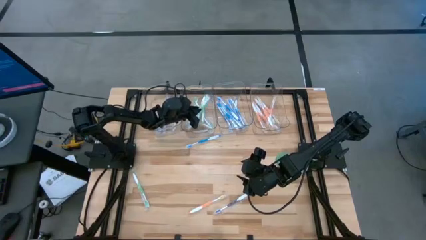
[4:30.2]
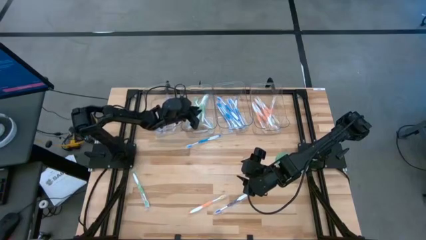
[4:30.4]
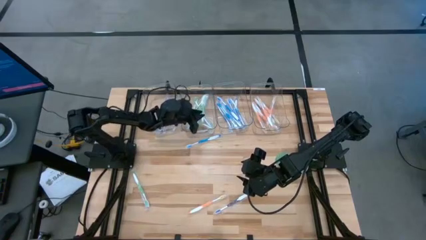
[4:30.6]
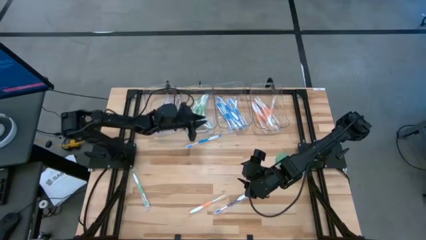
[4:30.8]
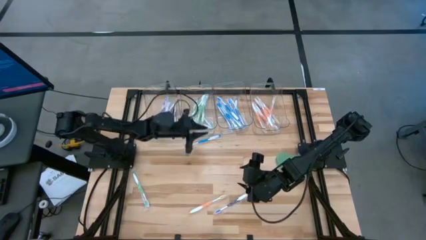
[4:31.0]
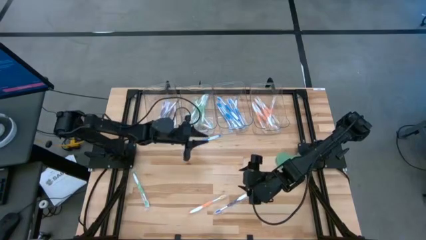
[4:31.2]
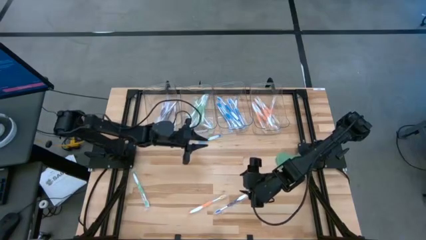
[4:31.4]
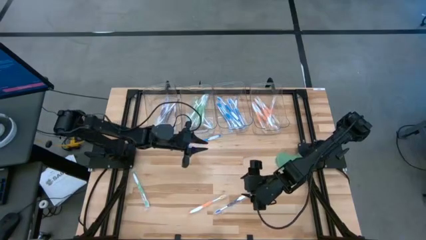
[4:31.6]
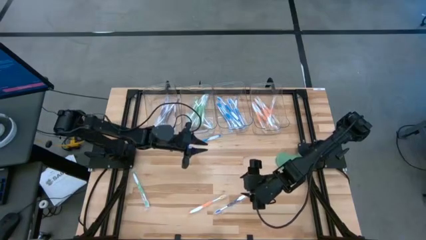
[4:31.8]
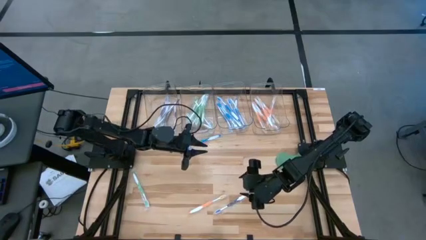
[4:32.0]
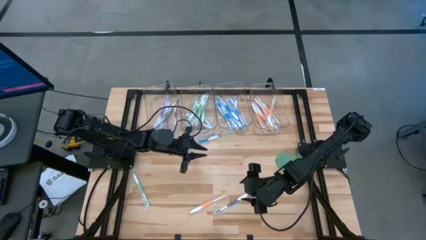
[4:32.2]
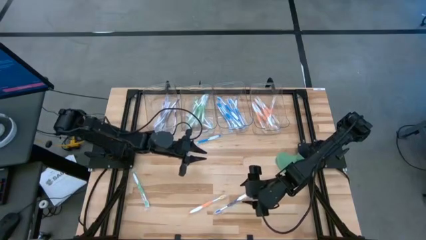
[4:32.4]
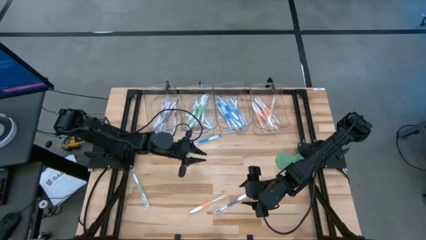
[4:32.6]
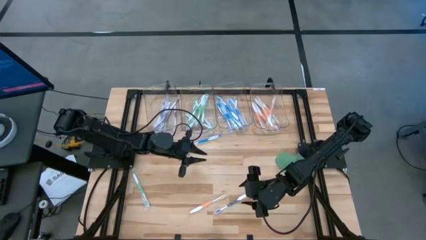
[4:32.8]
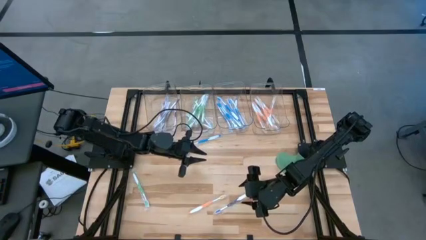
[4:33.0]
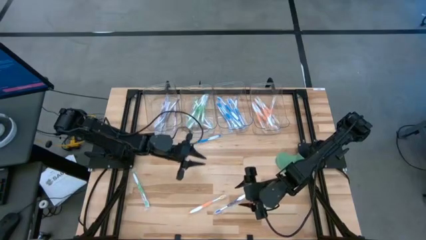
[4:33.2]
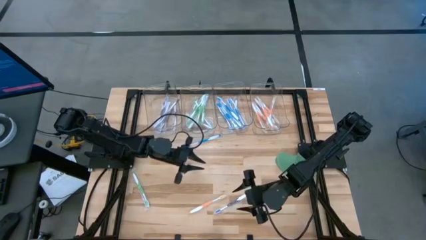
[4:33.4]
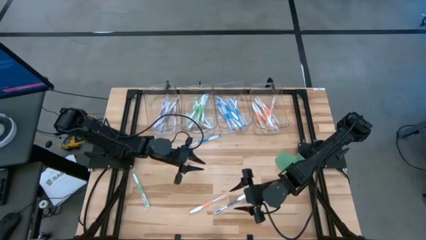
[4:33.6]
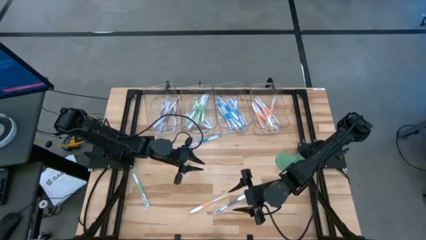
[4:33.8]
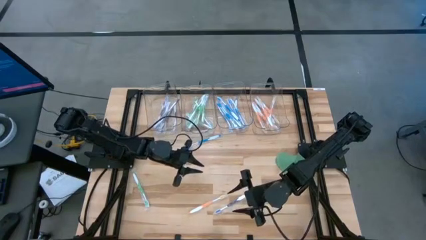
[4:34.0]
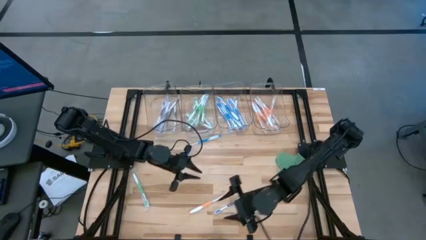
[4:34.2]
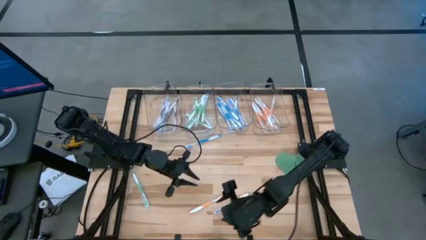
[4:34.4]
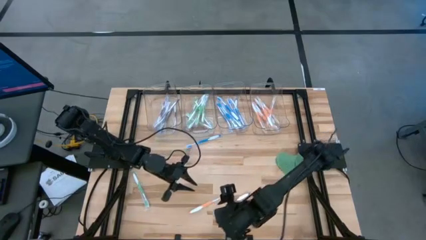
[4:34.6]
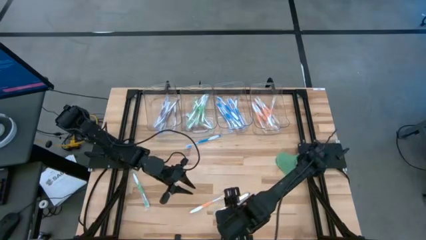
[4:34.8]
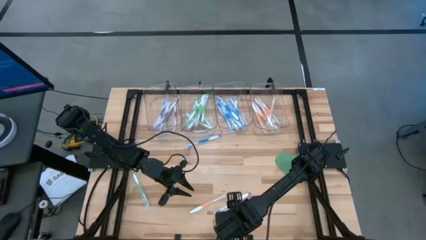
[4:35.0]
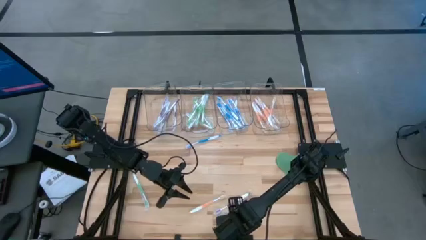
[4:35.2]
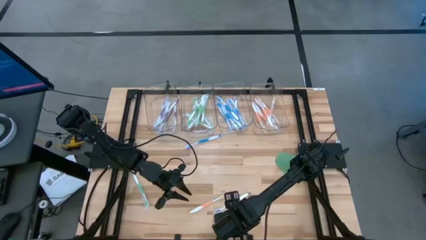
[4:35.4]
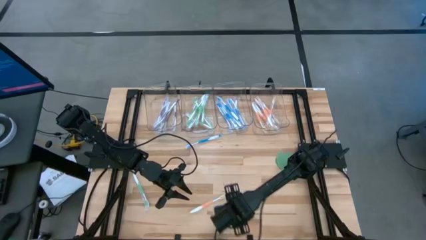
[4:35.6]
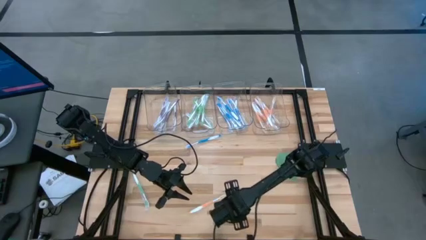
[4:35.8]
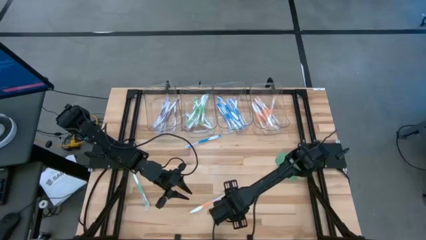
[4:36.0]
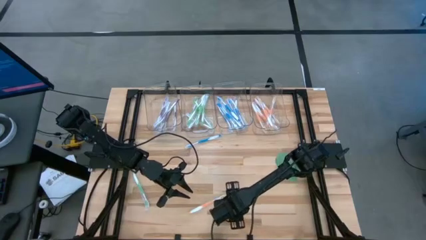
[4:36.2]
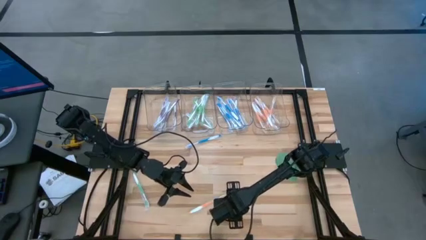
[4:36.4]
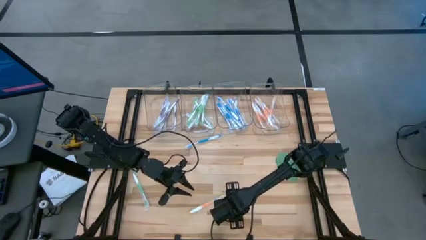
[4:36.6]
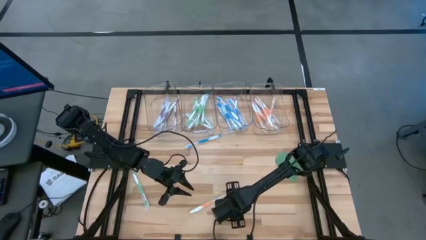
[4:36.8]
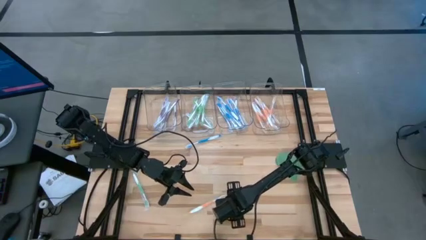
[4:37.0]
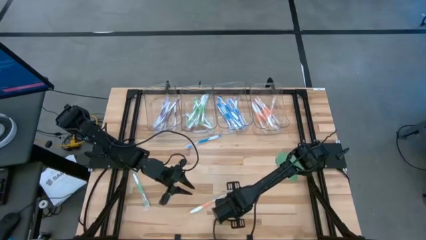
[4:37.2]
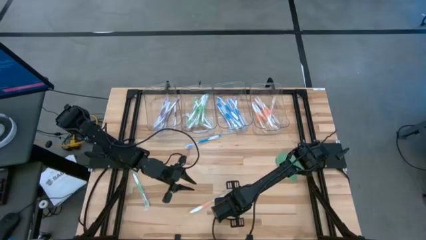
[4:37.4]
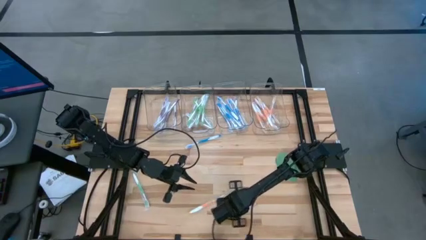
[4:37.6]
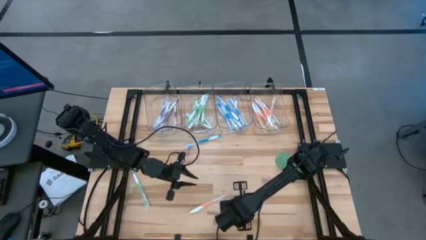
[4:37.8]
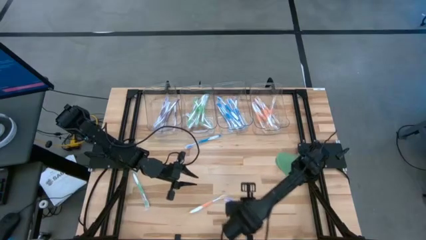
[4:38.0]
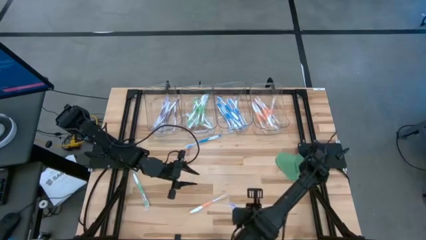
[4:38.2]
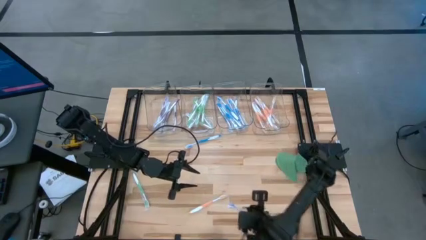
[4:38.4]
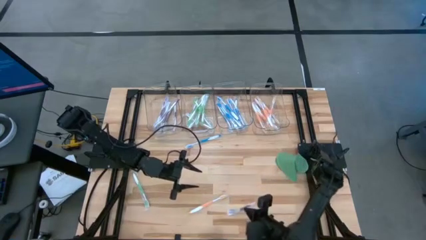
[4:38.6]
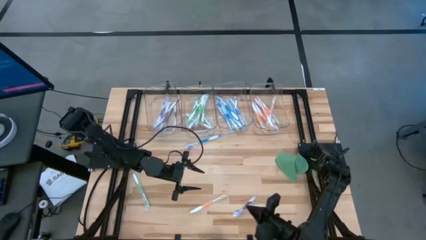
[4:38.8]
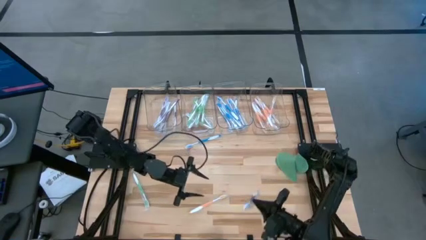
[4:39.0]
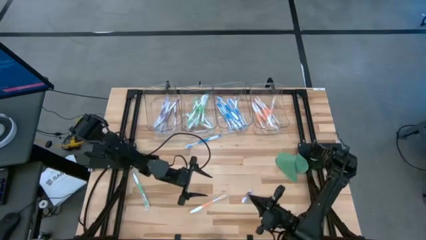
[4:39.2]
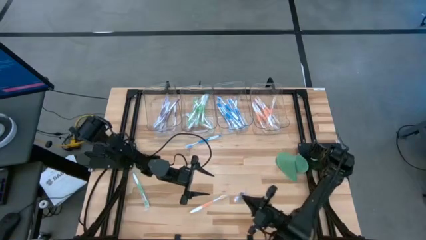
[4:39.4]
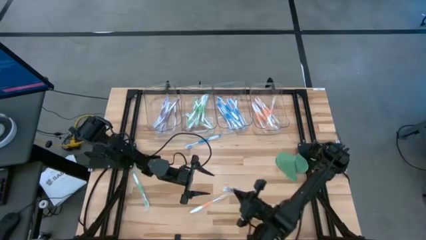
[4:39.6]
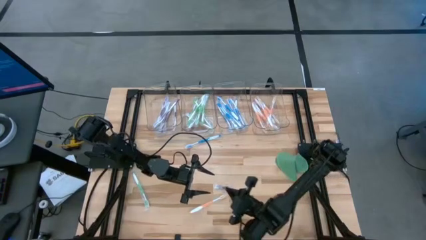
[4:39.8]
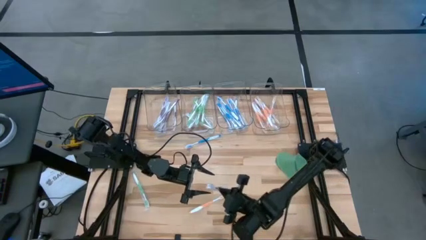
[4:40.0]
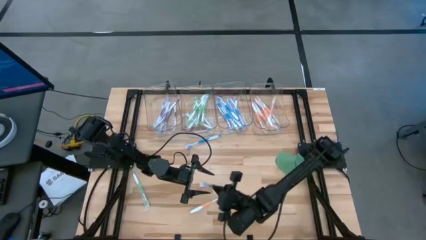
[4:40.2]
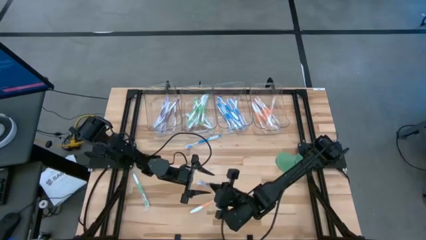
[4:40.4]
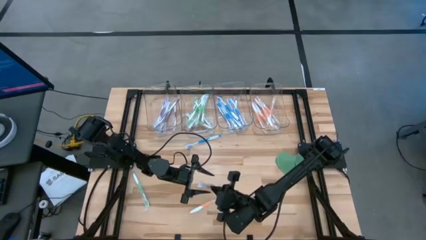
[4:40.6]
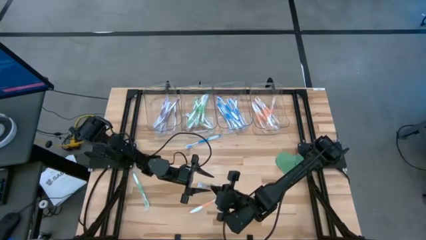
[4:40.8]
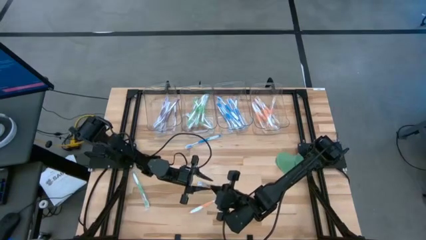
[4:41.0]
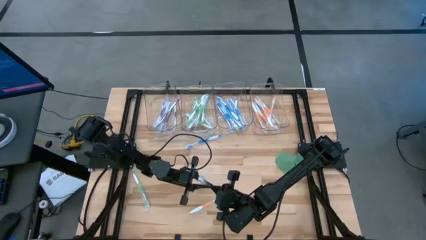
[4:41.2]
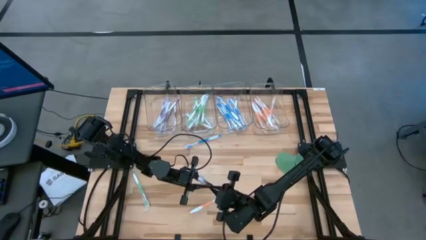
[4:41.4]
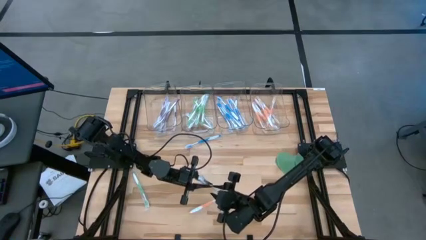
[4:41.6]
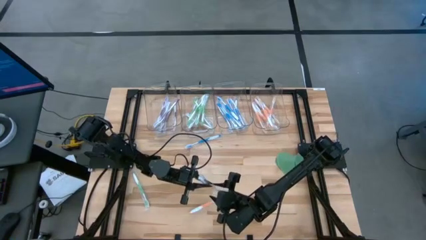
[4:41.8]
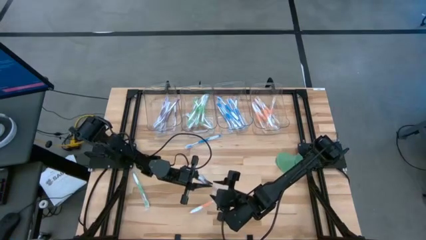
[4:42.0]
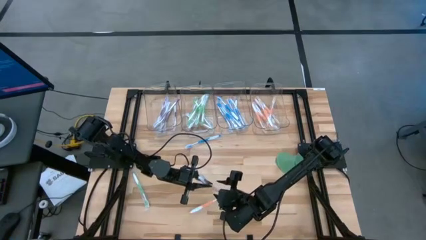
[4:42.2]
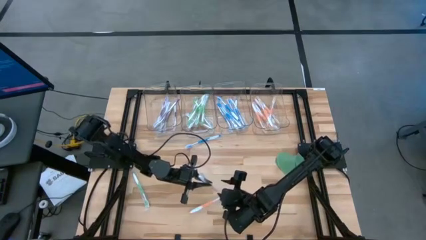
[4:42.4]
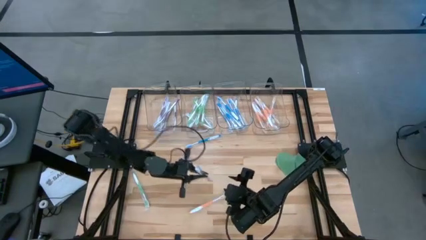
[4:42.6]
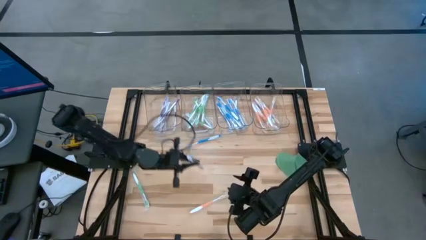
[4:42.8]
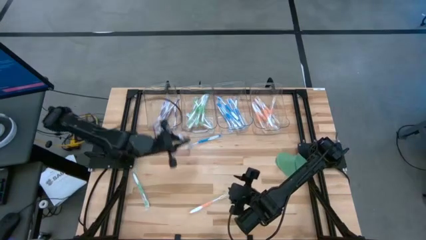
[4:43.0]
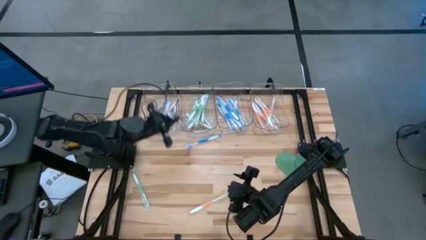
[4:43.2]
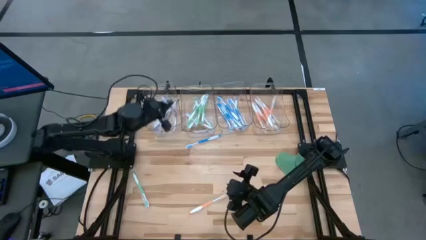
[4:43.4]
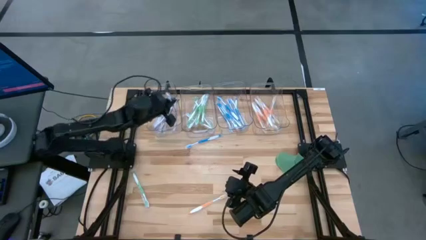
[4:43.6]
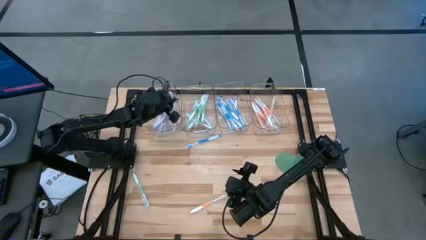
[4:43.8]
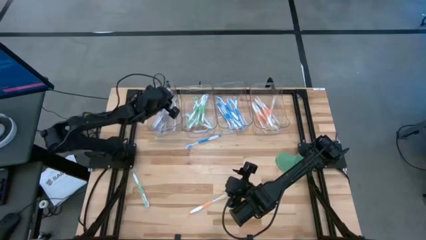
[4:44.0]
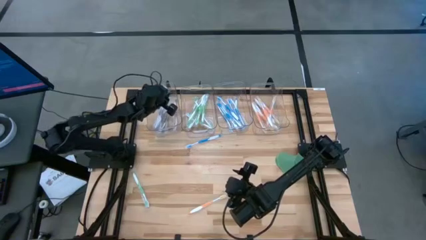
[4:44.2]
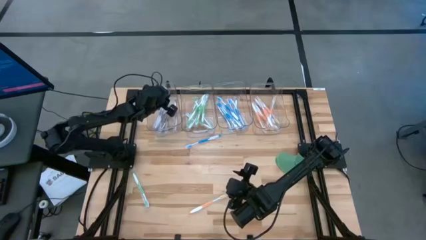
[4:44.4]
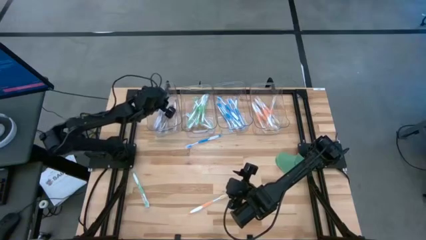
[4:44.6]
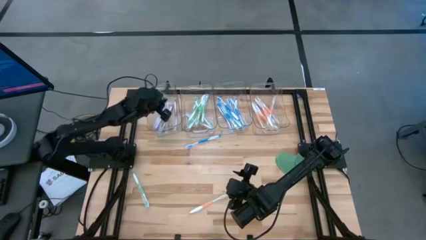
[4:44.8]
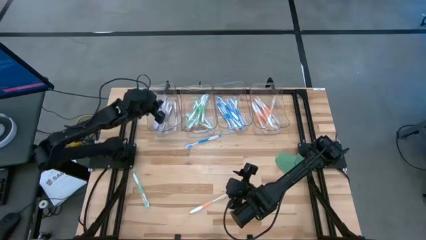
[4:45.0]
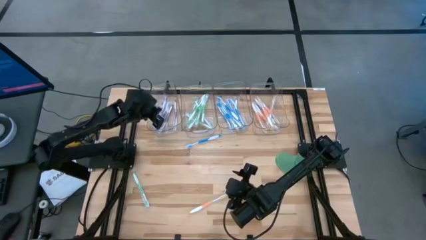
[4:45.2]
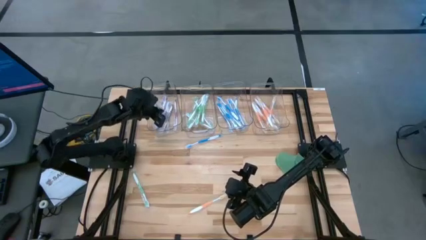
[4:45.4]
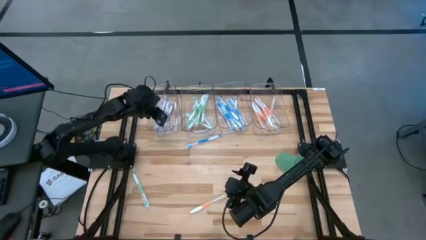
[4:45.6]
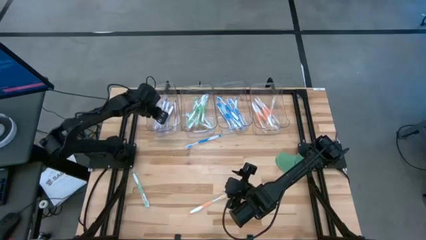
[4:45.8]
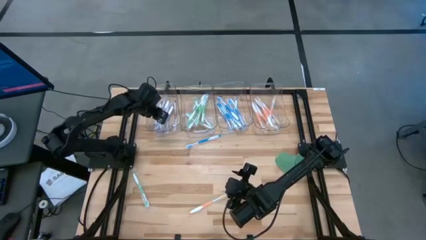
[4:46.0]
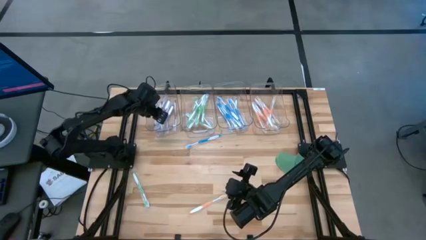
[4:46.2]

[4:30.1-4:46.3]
Task: Pick & Place Toothbrushes
Put the purple toothbrush into the left transparent bin
